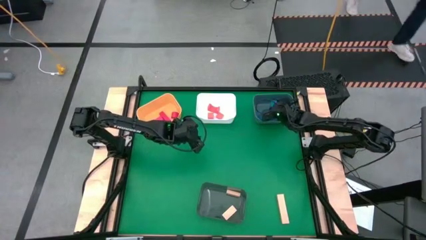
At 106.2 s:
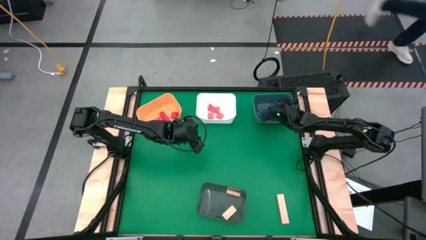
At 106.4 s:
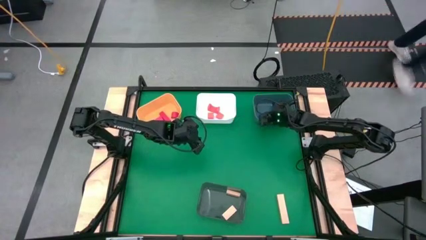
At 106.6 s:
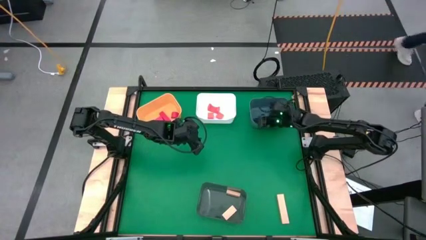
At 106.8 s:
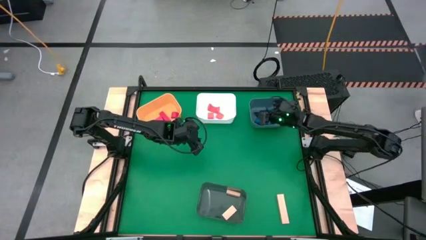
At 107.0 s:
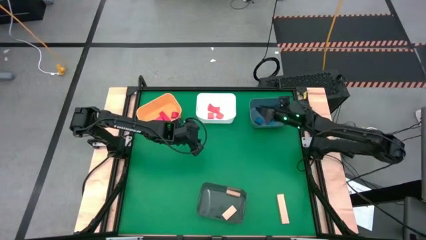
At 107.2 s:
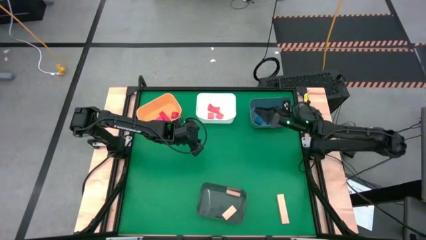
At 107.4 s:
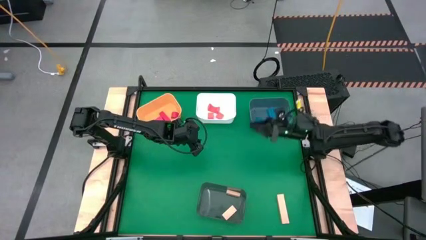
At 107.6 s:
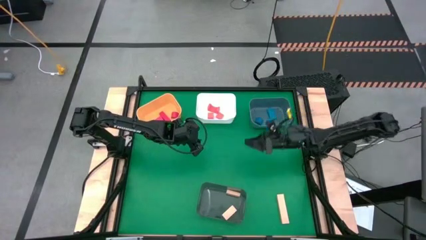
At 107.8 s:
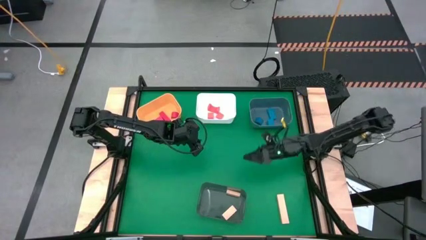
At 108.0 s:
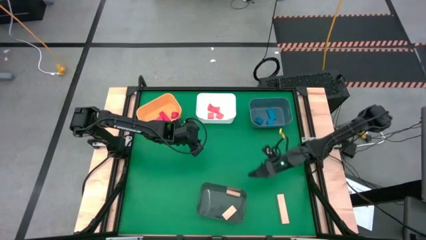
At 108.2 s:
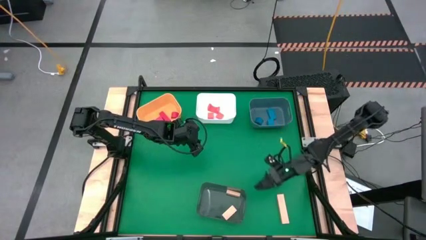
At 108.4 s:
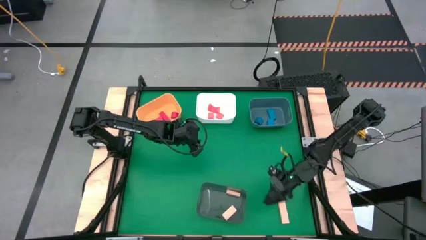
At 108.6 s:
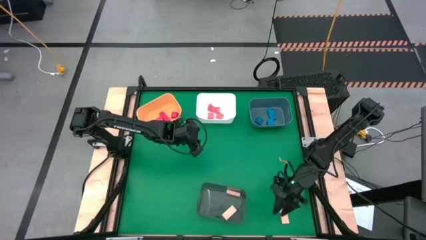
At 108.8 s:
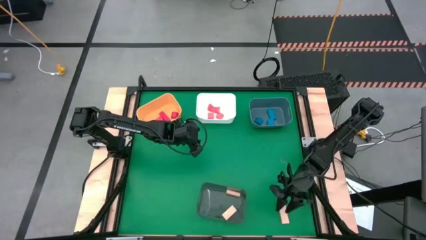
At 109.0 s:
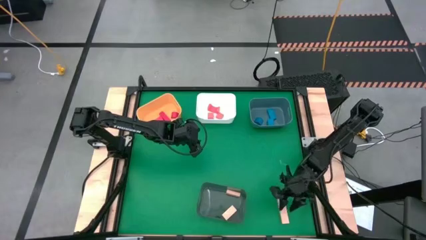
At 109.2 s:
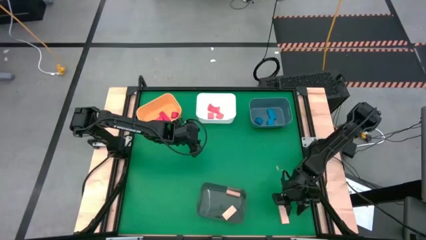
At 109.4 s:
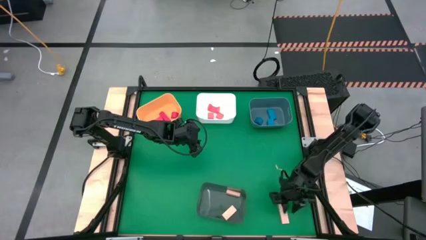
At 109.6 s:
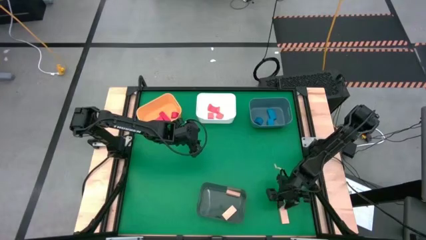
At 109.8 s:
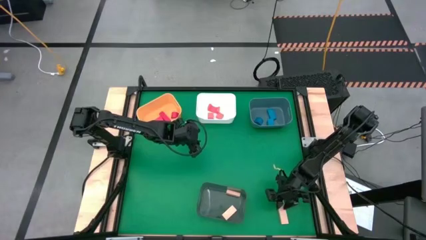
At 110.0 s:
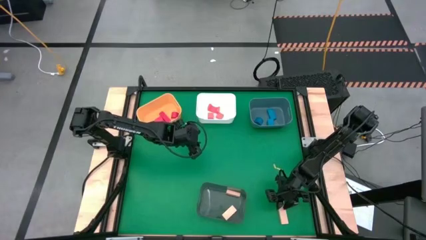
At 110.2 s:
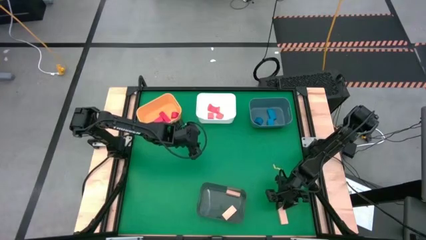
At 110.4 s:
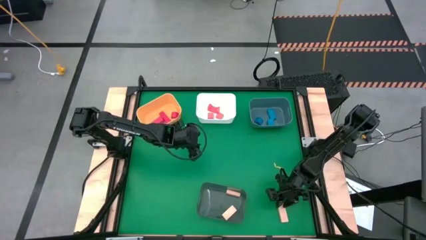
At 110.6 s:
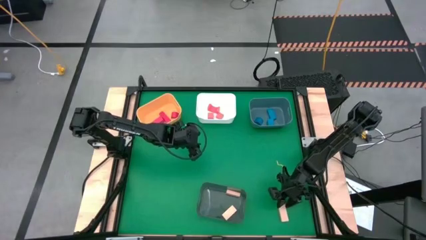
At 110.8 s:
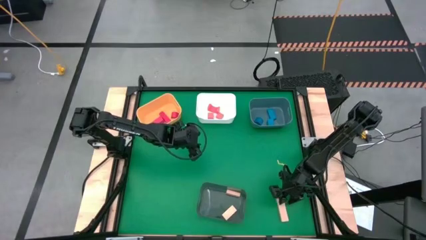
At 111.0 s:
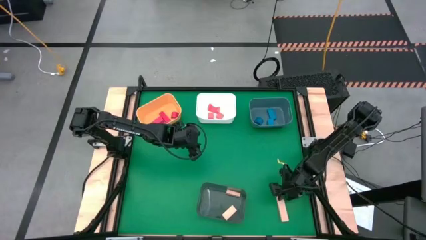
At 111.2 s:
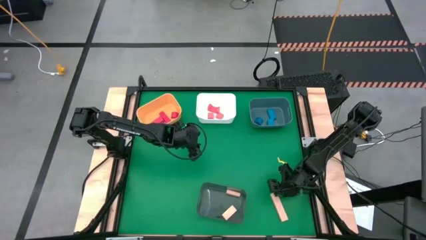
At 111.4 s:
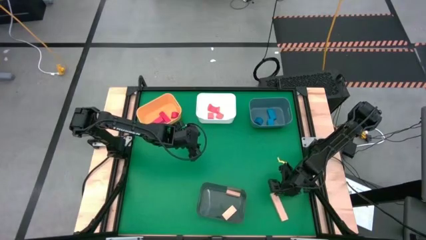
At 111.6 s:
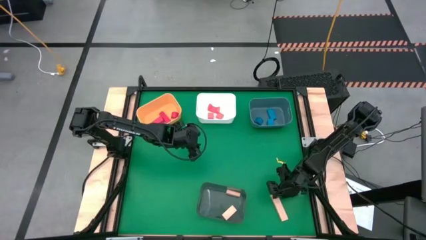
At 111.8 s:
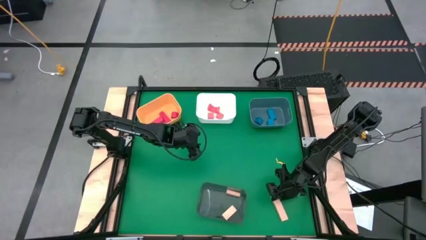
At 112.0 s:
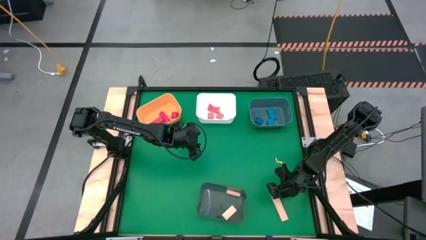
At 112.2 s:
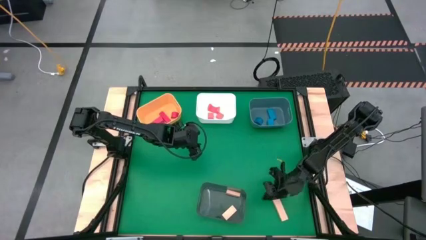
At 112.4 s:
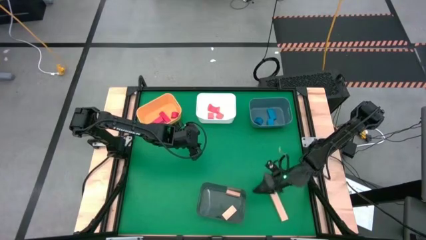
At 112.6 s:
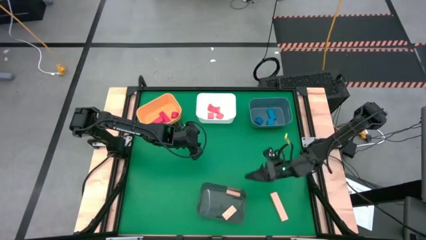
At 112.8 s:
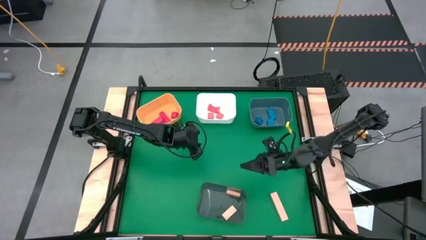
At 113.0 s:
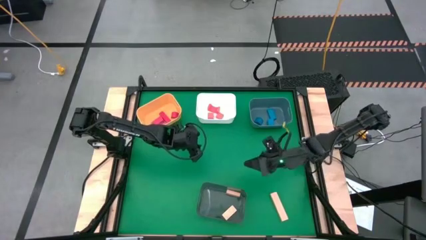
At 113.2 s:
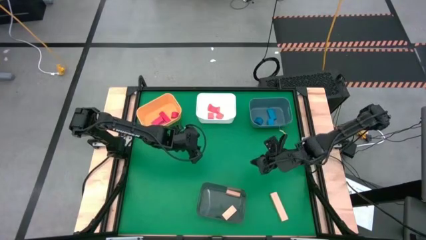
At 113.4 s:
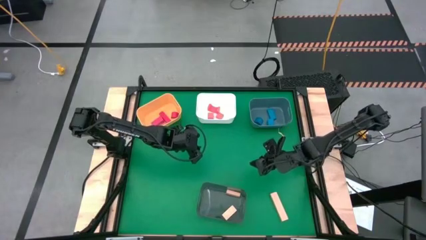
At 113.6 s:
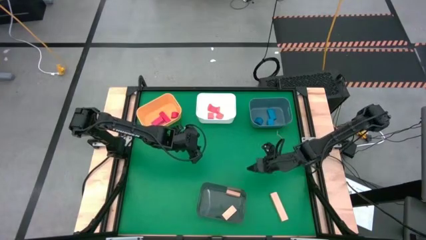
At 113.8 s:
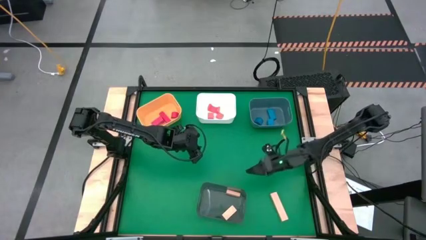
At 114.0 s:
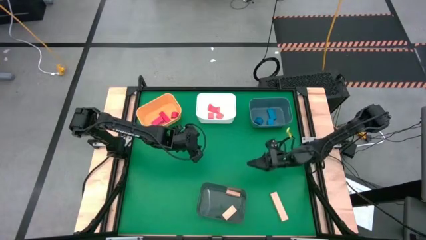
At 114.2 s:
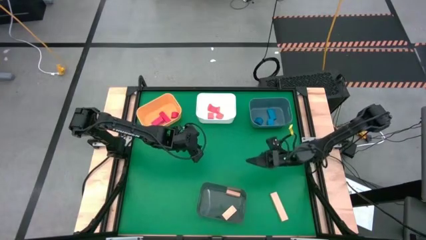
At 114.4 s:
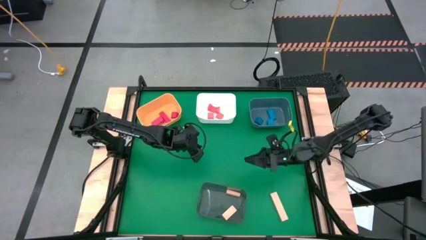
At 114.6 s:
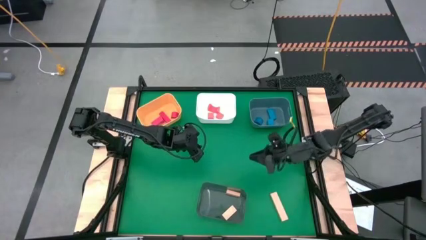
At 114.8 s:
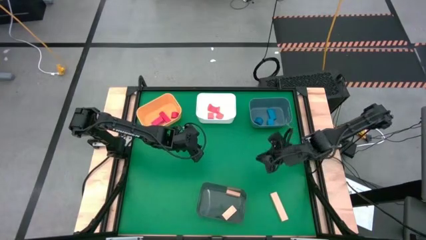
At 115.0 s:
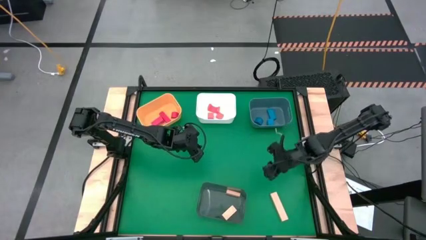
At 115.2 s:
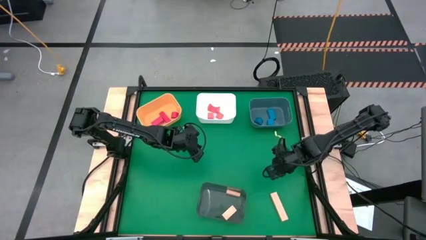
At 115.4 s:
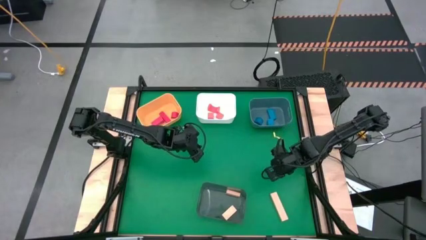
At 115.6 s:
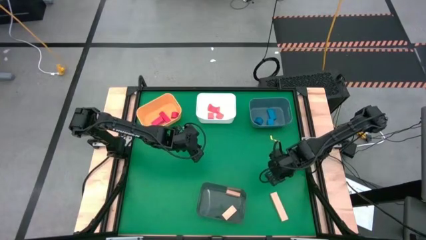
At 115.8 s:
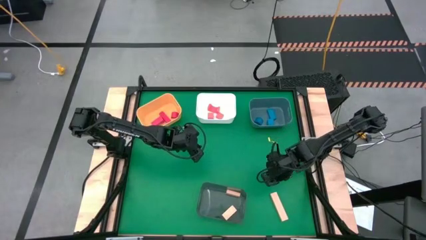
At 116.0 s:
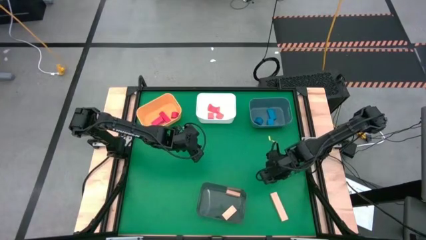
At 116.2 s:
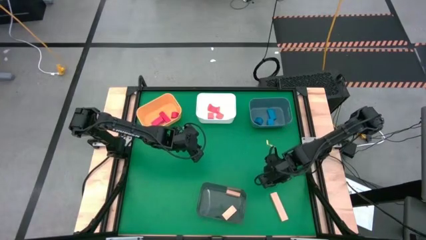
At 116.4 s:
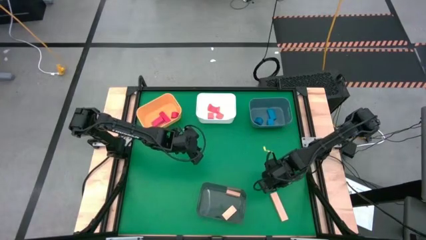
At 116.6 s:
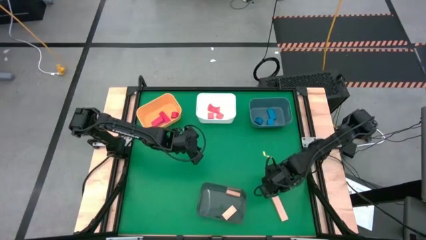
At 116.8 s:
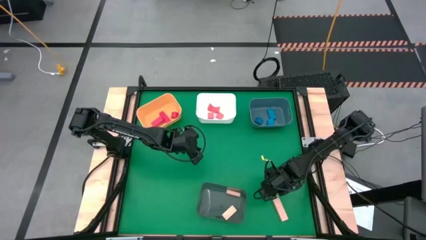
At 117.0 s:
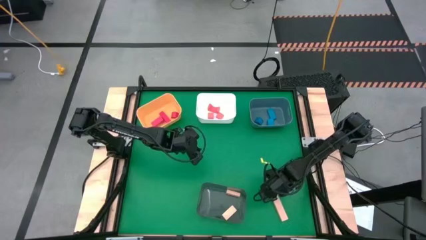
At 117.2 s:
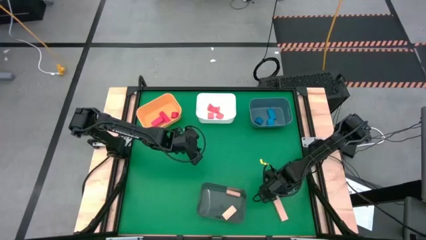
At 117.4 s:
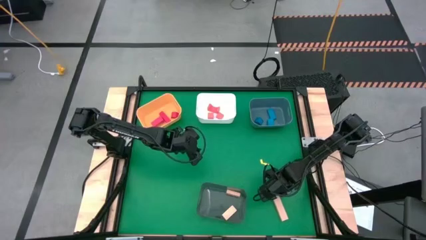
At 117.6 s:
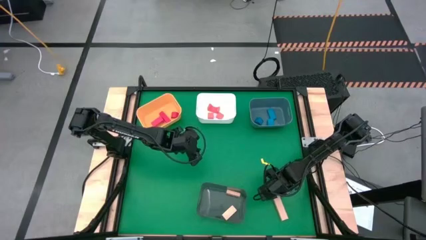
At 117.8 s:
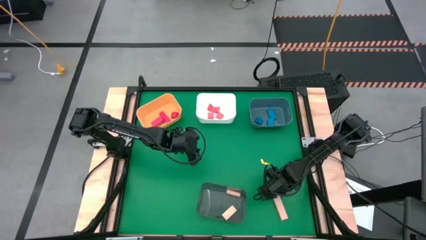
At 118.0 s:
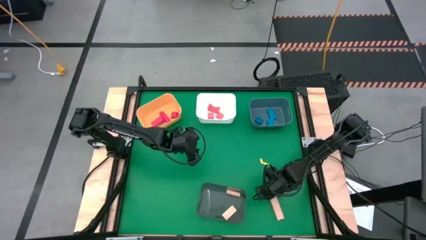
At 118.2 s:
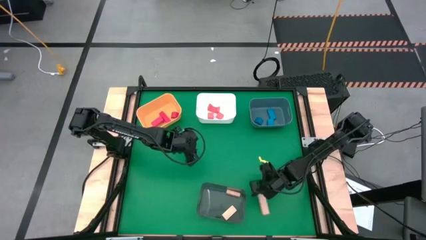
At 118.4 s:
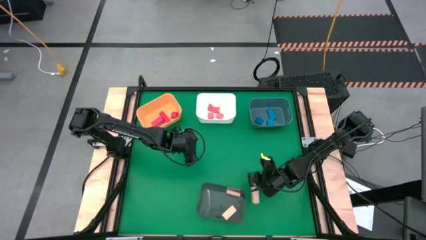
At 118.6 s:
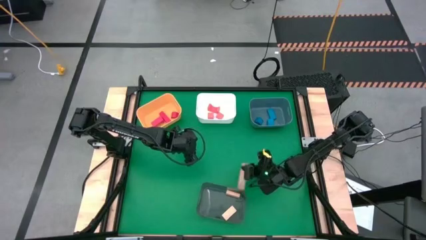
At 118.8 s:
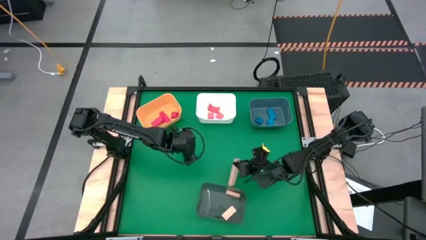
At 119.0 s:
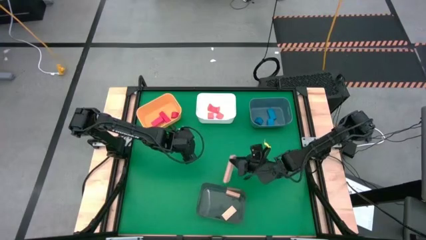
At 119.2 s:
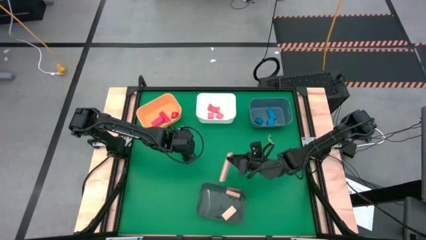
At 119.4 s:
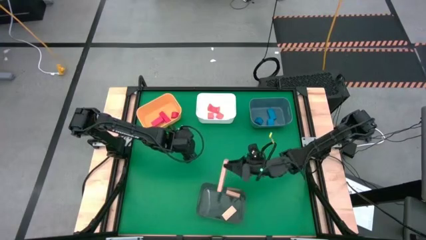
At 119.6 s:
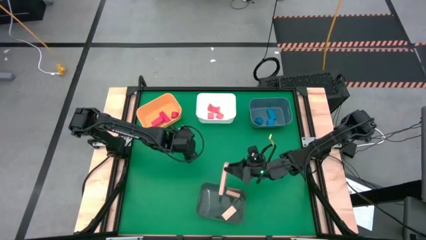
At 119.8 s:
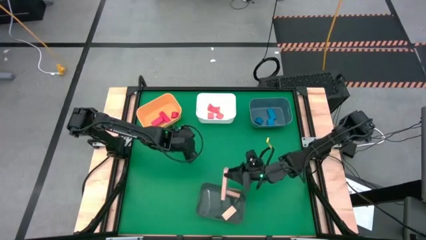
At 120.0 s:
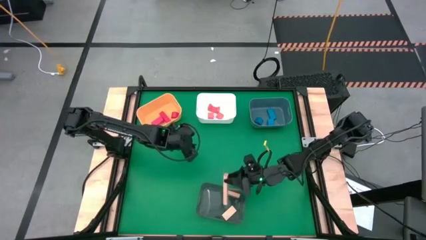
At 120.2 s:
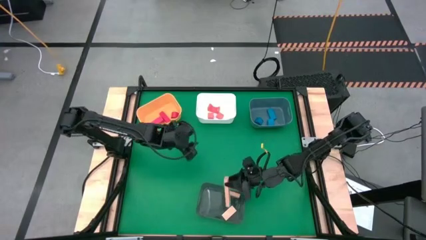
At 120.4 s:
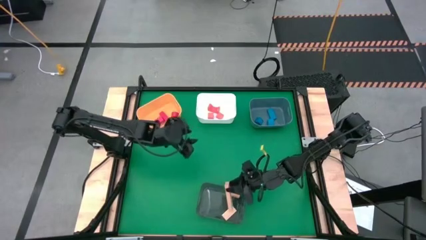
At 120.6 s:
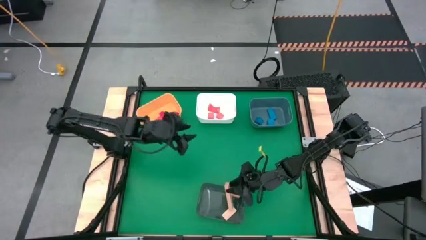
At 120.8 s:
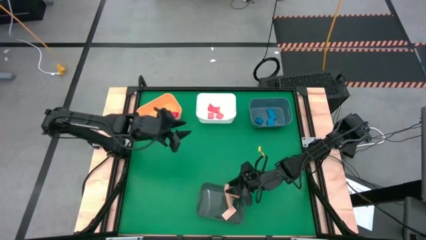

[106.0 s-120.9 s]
Task: Sort & place blocks by color
Put the light orange block into the black bin

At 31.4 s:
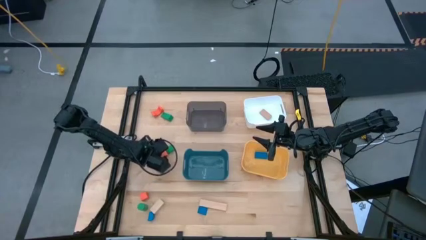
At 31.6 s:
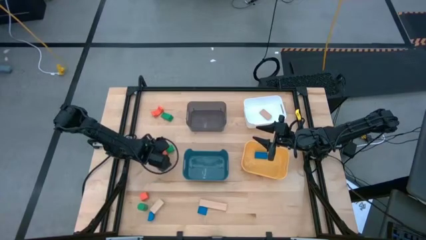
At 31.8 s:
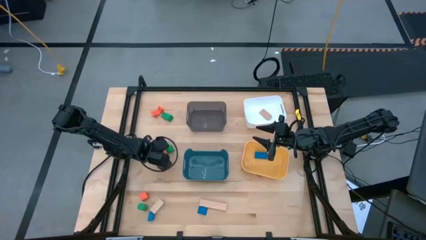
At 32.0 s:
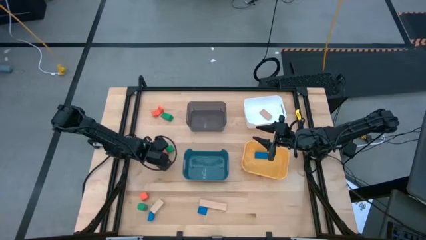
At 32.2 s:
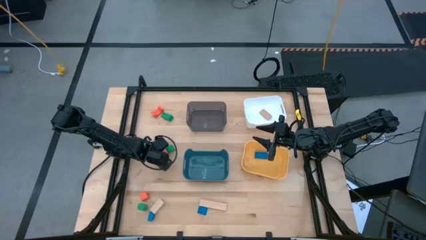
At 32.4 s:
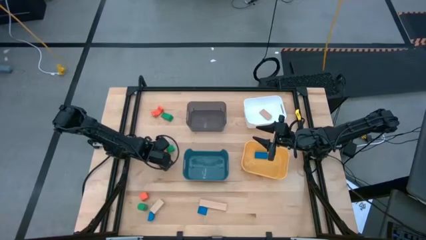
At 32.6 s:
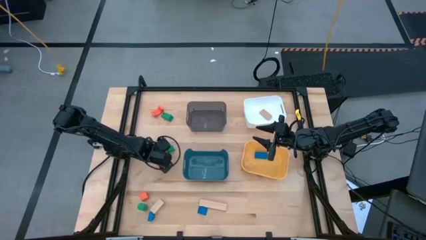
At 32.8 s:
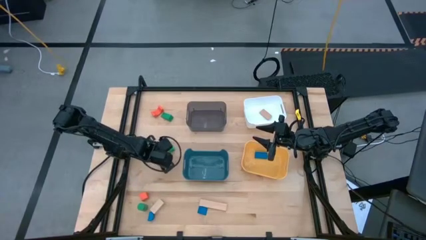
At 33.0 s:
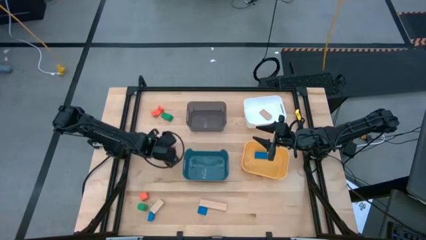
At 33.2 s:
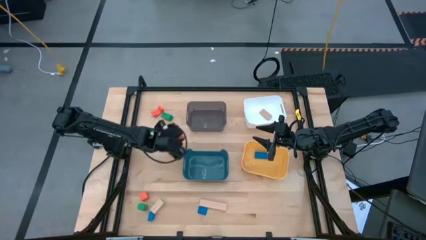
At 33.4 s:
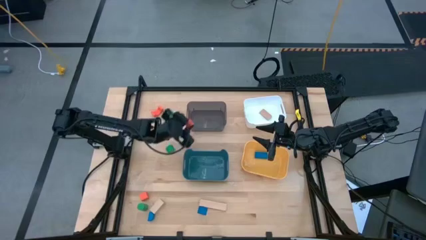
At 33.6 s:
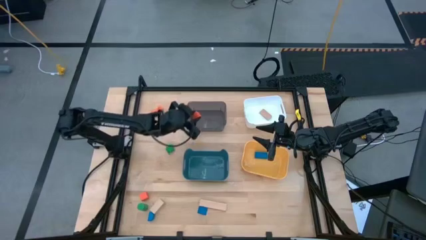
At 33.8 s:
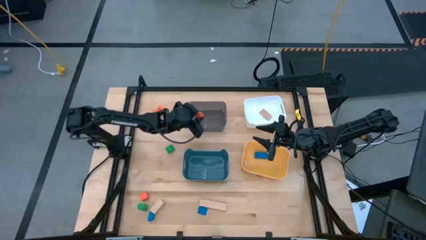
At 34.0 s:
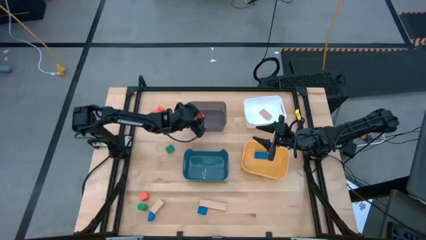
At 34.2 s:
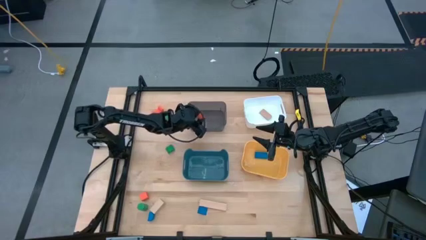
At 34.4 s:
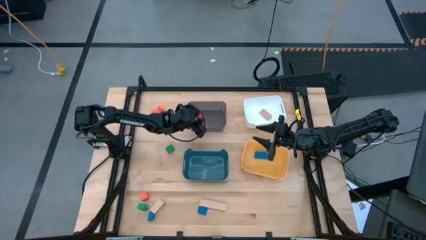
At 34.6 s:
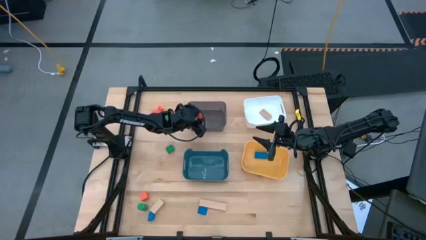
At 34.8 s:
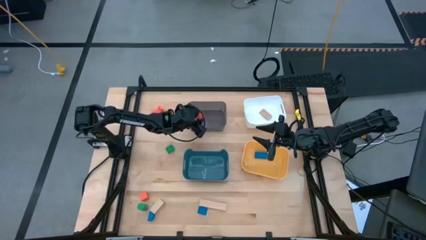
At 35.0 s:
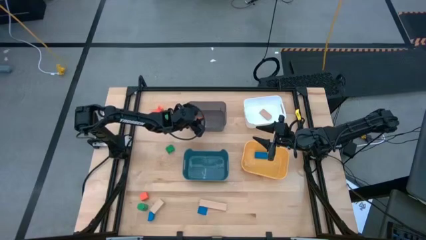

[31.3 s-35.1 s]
Task: Sort & place blocks by color
Put the middle orange block into the transparent black bin
